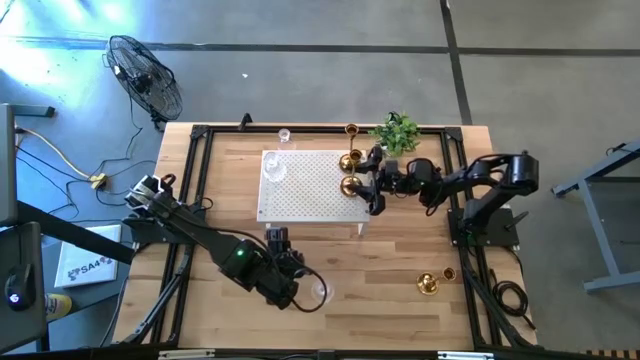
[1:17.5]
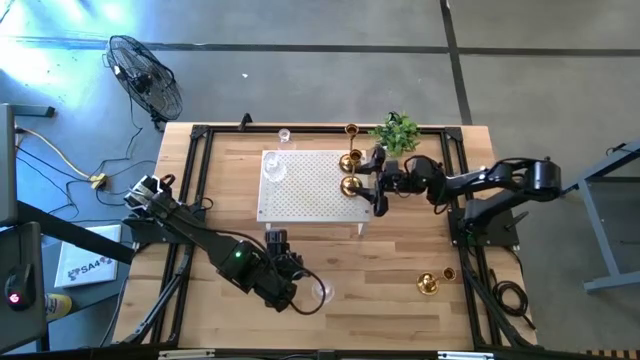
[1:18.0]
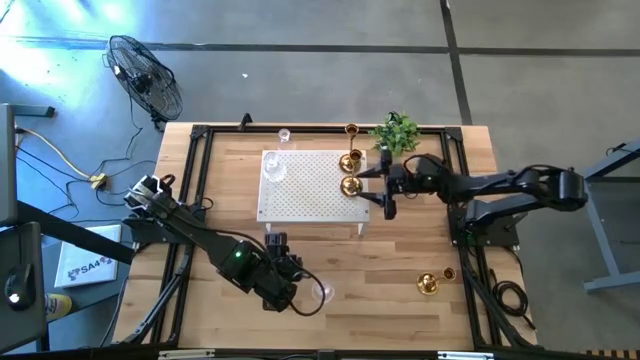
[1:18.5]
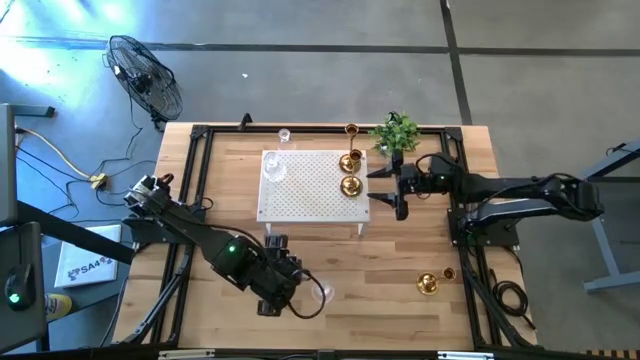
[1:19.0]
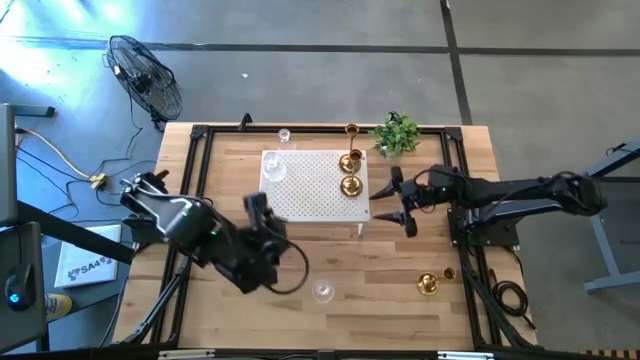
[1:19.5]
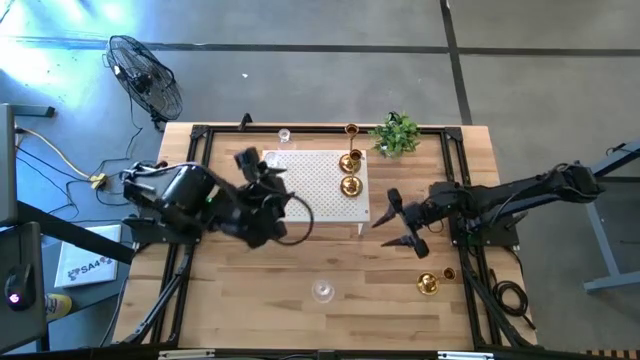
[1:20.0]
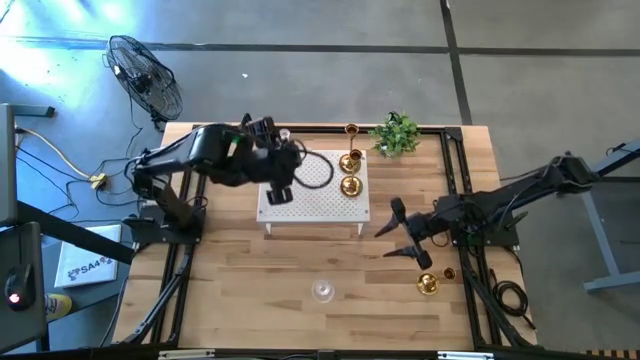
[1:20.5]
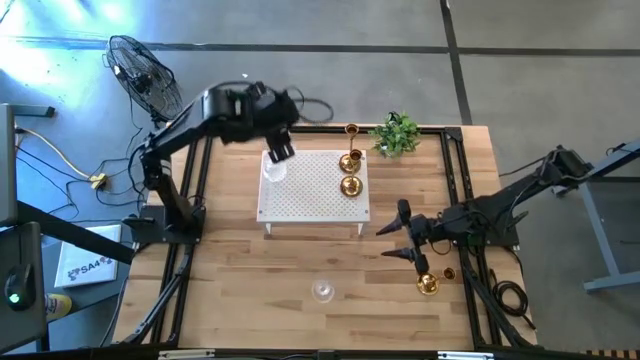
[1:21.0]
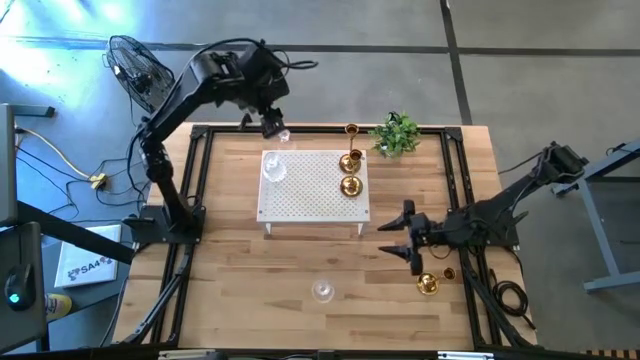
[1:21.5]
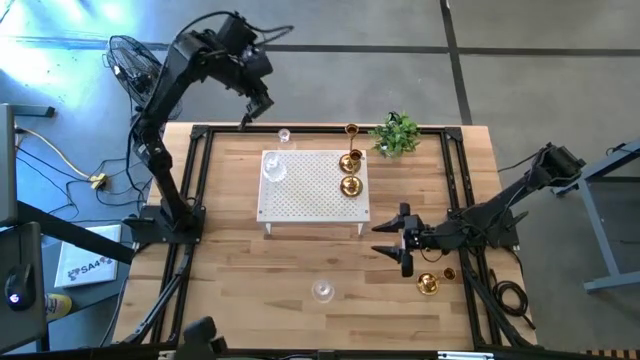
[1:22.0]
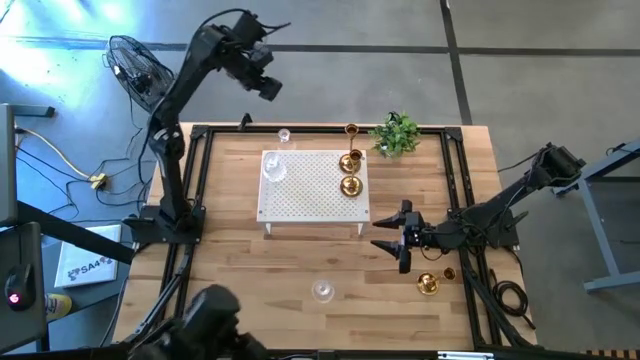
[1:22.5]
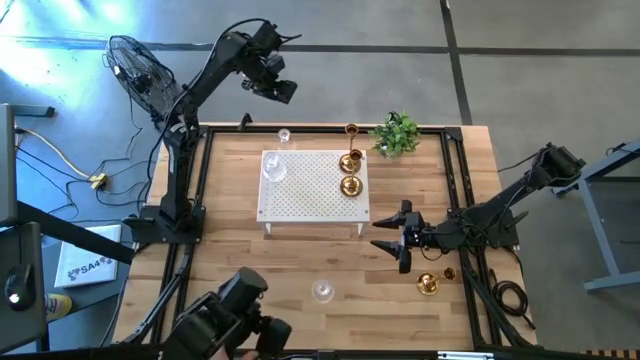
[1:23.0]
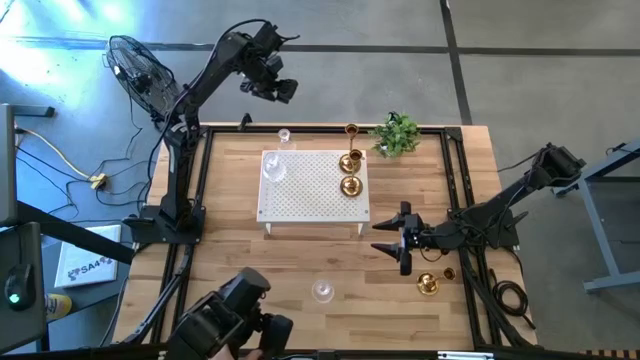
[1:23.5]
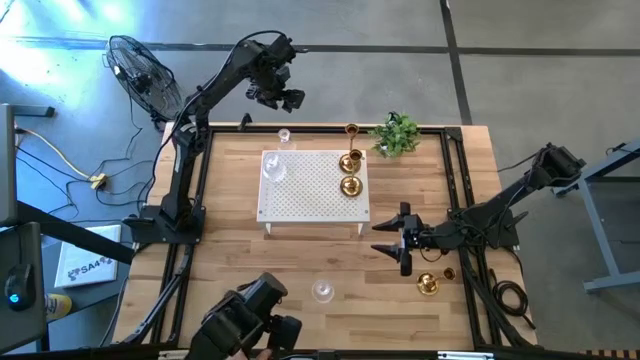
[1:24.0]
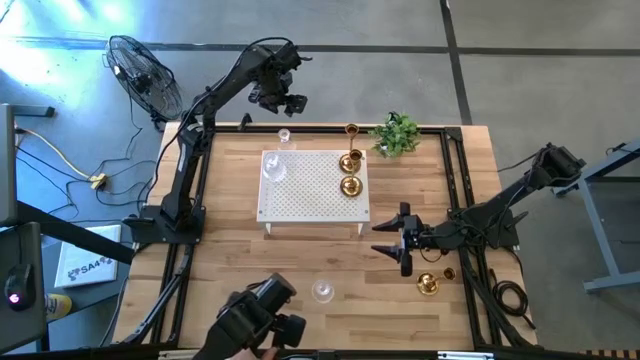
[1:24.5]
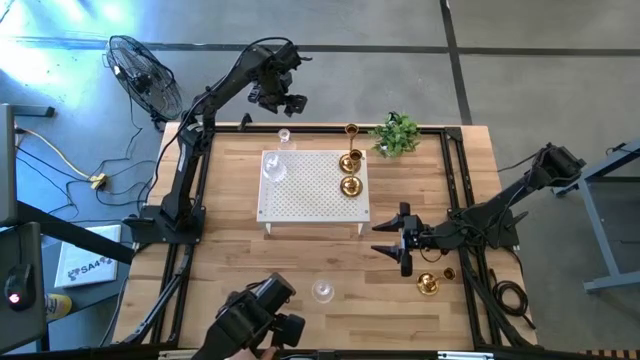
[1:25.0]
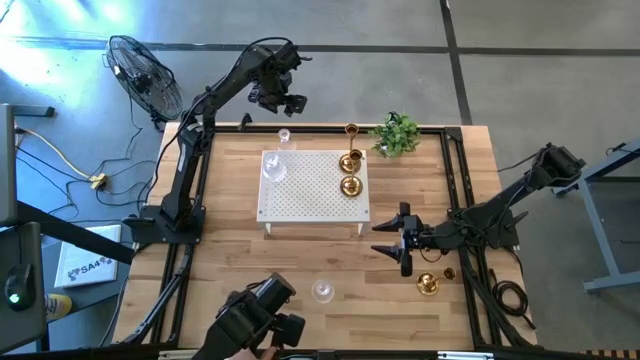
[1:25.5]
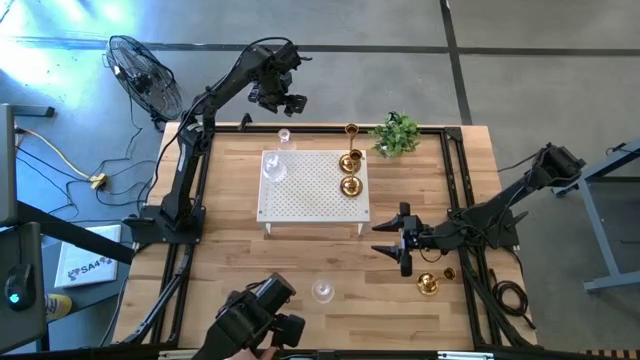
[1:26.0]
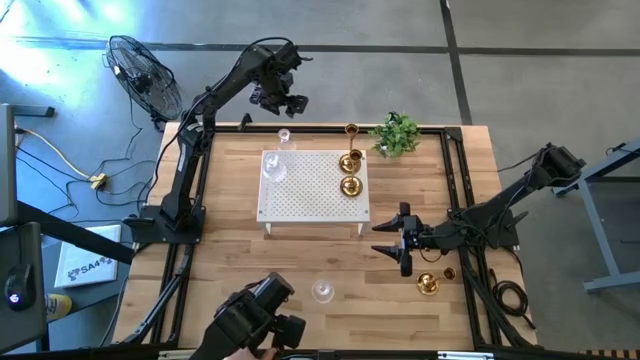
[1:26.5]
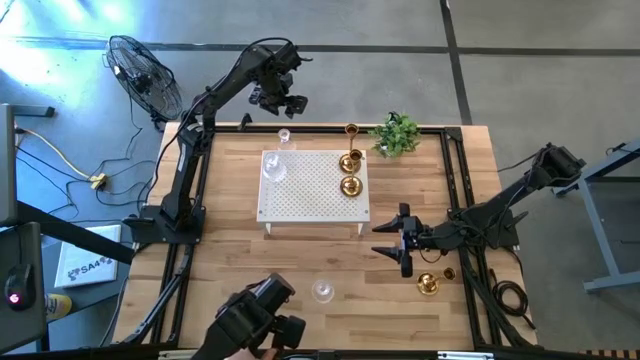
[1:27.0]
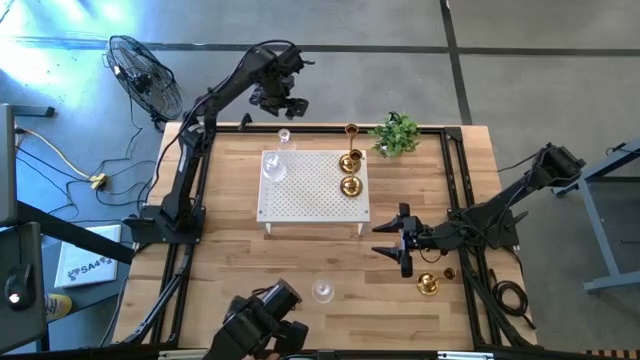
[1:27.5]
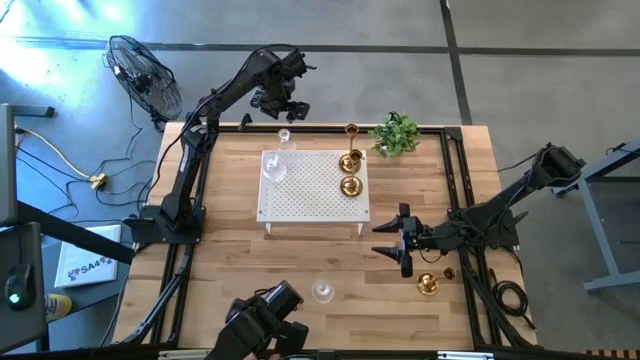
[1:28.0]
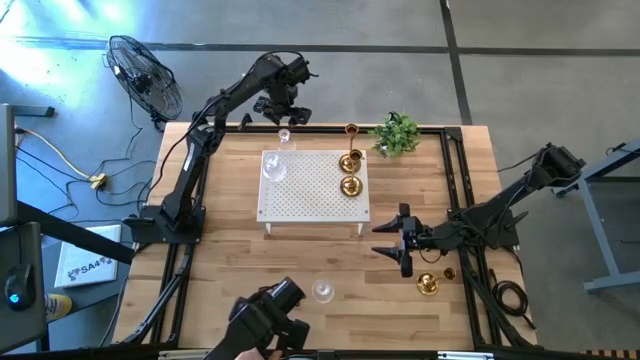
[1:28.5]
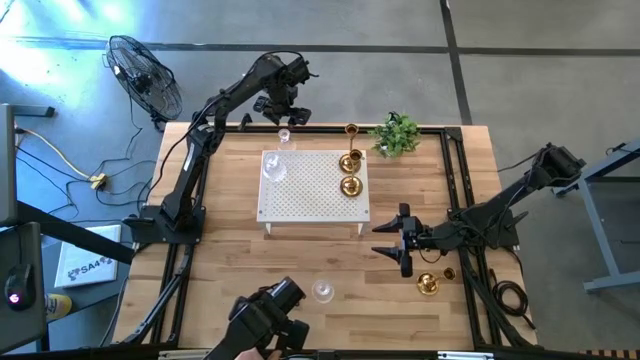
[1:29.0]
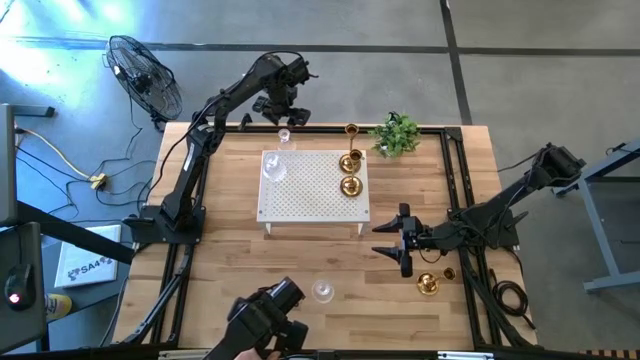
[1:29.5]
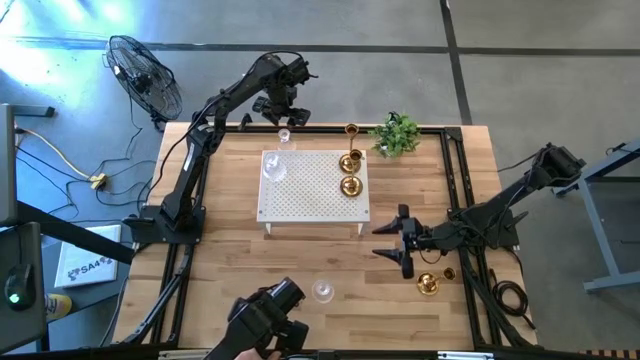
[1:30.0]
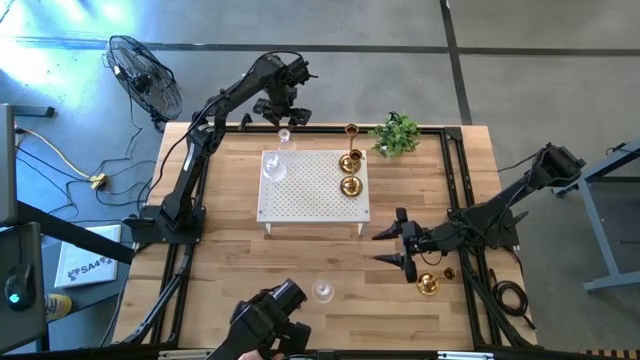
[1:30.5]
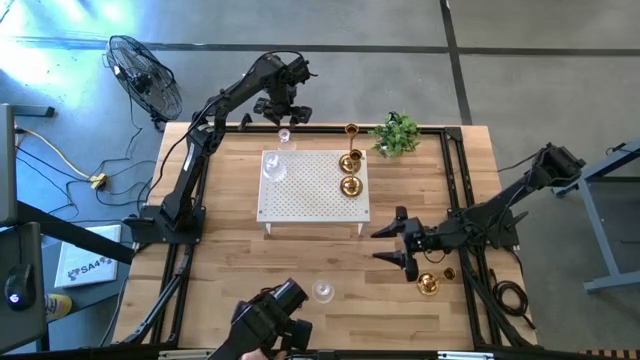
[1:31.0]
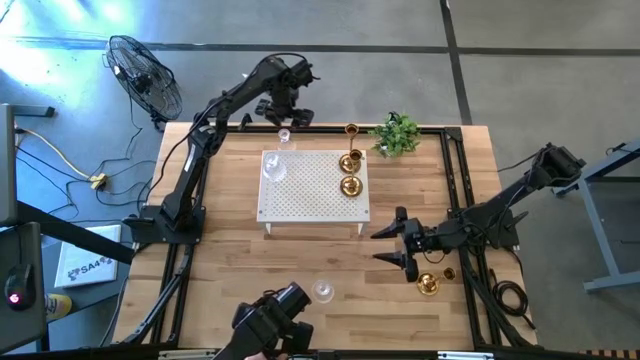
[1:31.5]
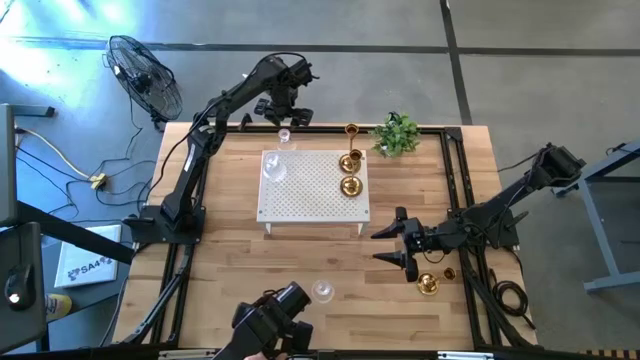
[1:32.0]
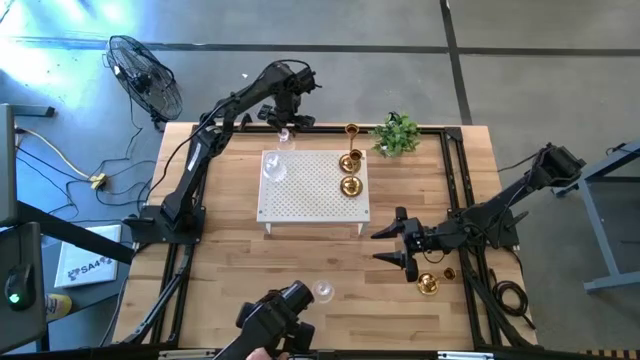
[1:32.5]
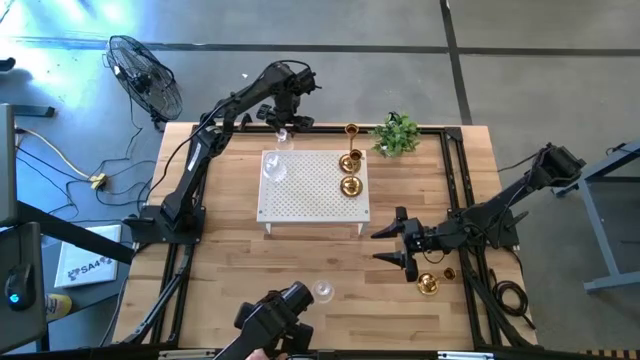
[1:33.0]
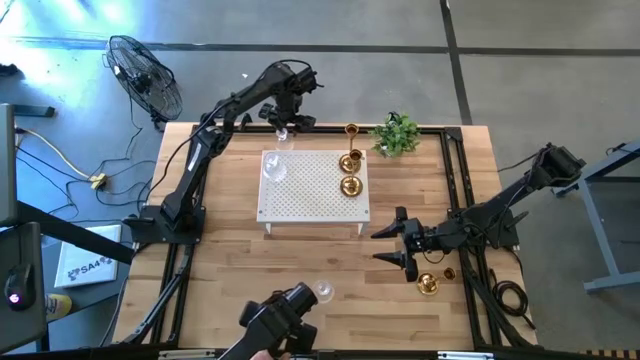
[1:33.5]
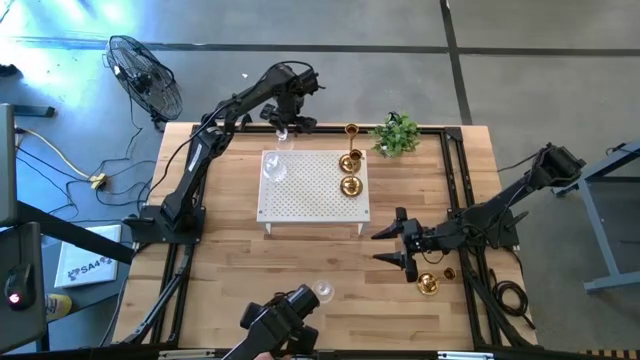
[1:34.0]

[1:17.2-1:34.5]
Task: Pick & Place candle stick holders
Put the top transparent glass candle holder on the shelf aligned with the other transparent glass candle holder

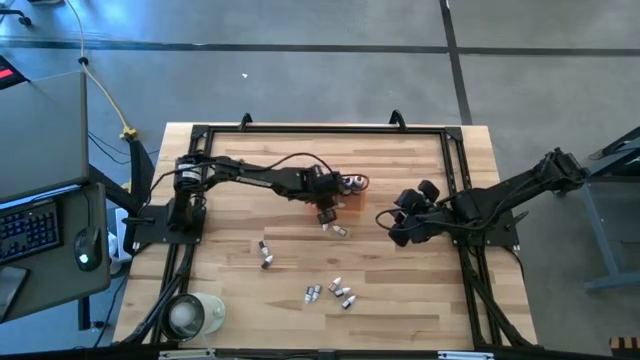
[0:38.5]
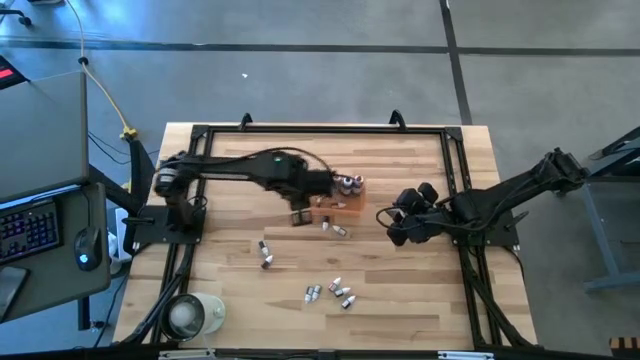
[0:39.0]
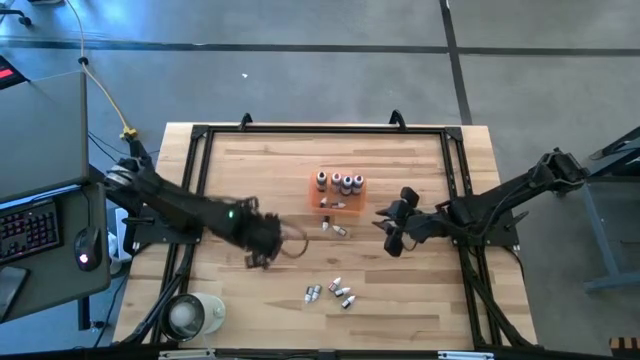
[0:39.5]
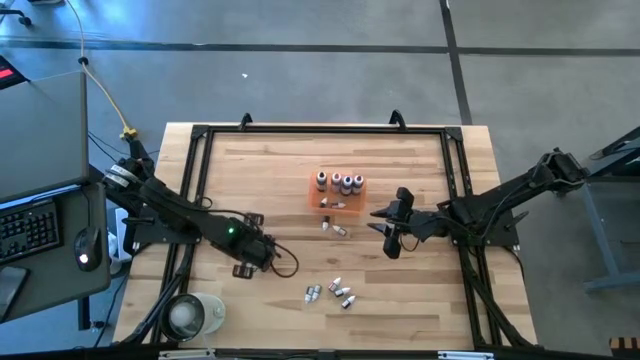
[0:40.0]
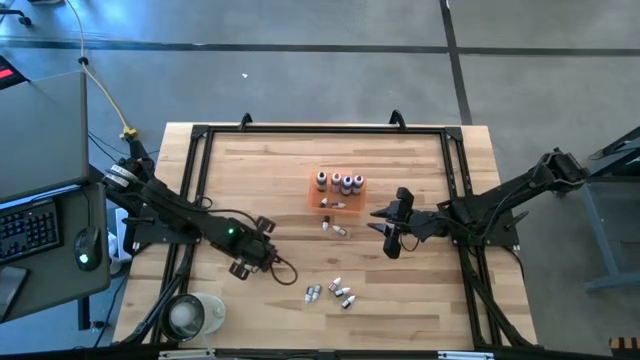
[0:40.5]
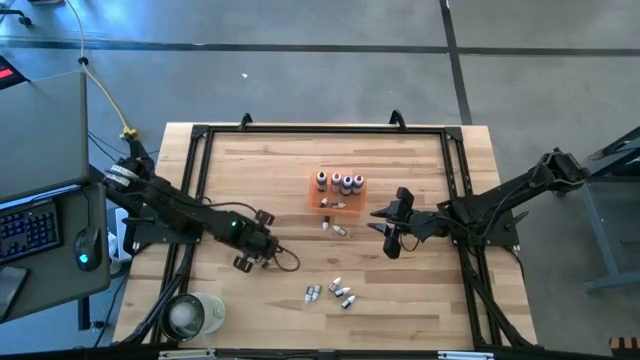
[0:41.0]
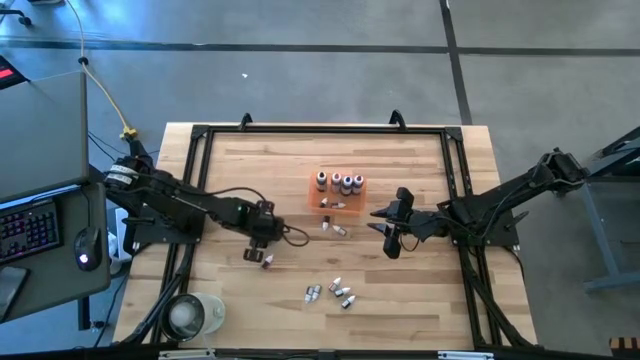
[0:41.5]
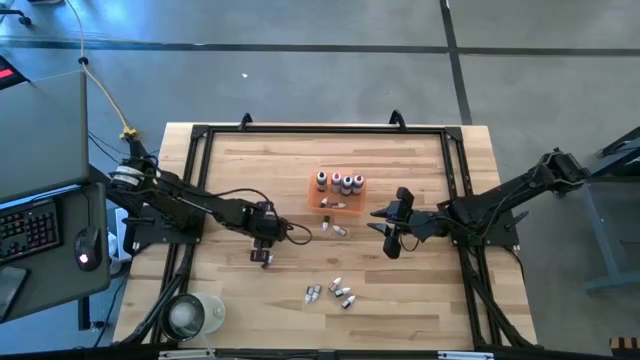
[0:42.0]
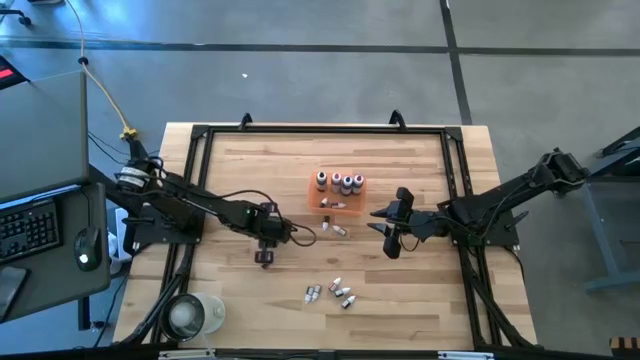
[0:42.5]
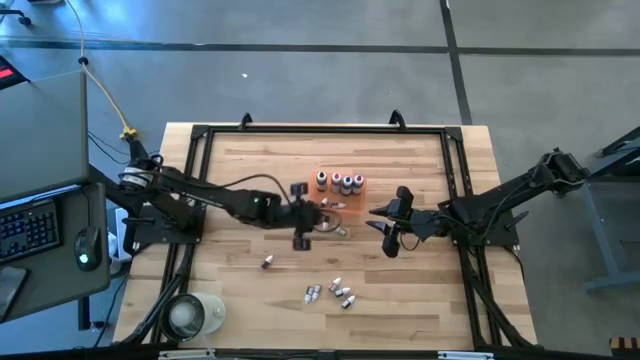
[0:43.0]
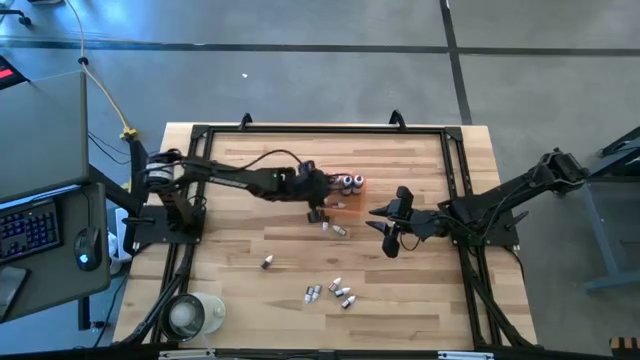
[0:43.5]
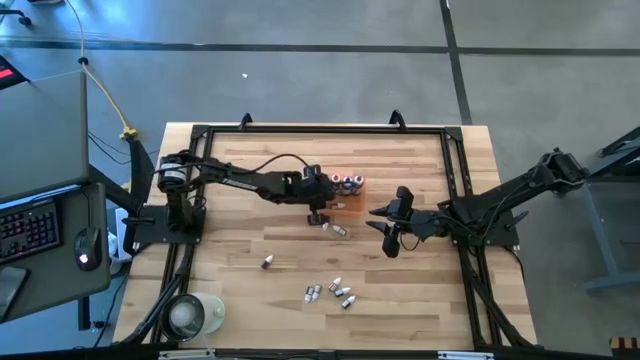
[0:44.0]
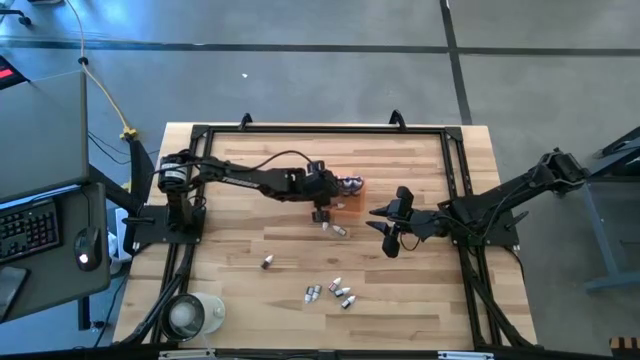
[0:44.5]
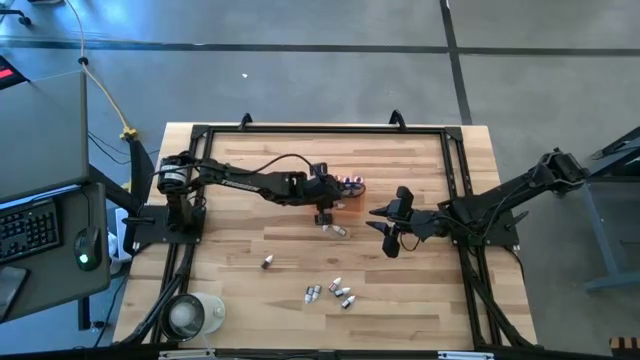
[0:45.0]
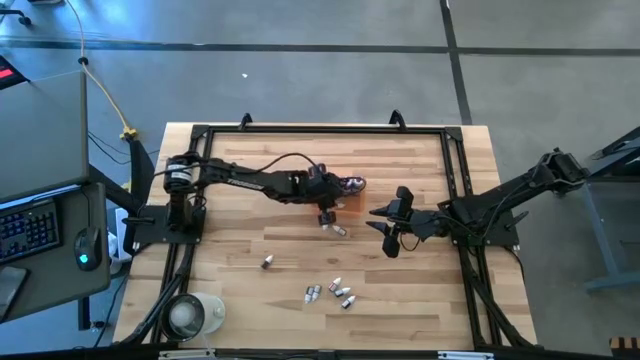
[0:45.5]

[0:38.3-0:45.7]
Task: Pick & Place food coloring
Put the small blue food coloring bottle into the orange bin
